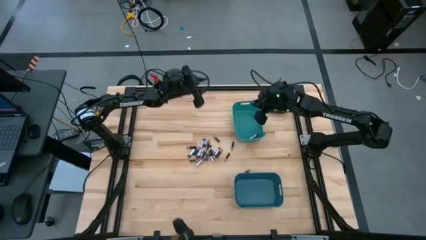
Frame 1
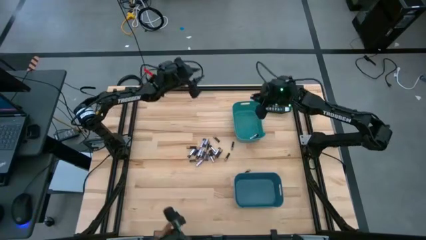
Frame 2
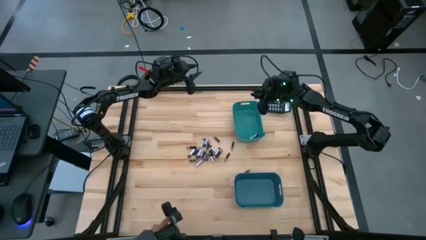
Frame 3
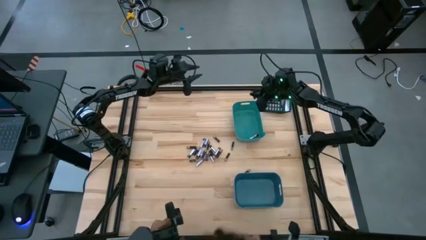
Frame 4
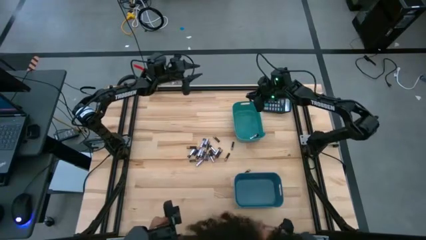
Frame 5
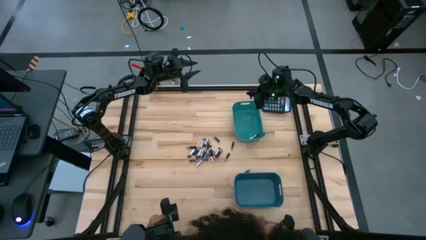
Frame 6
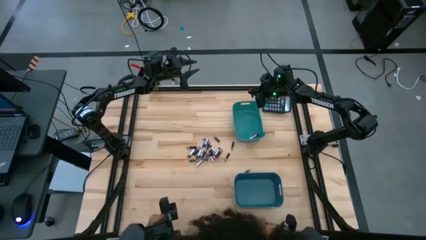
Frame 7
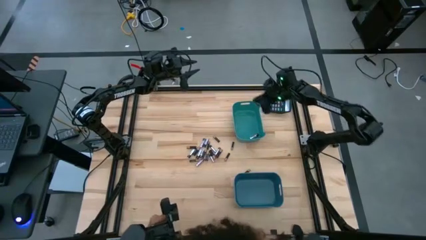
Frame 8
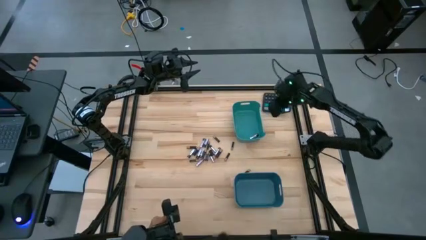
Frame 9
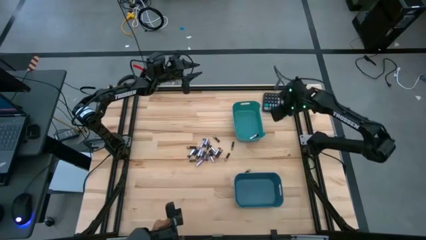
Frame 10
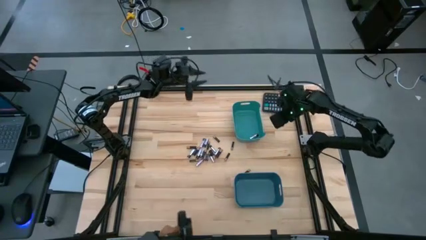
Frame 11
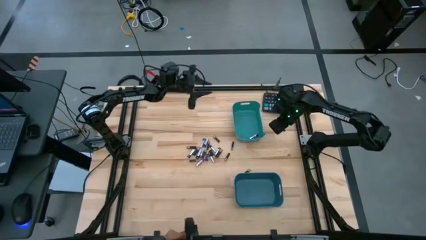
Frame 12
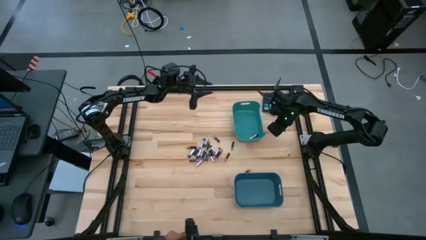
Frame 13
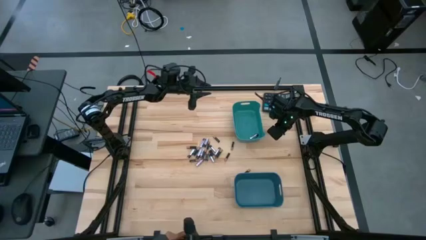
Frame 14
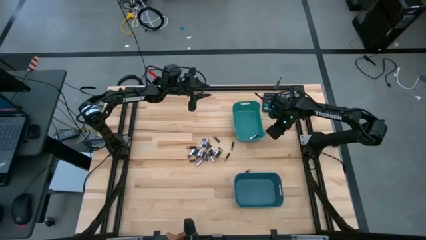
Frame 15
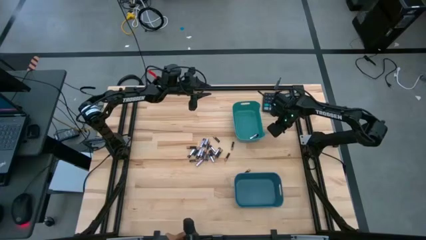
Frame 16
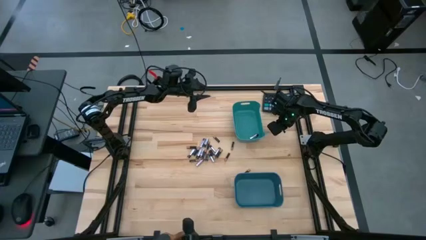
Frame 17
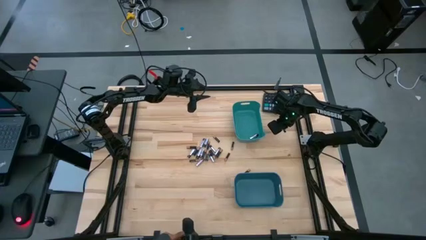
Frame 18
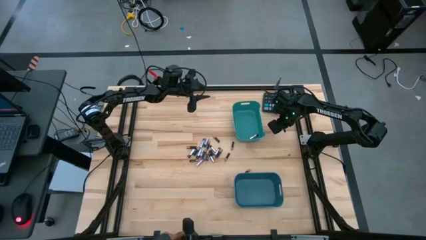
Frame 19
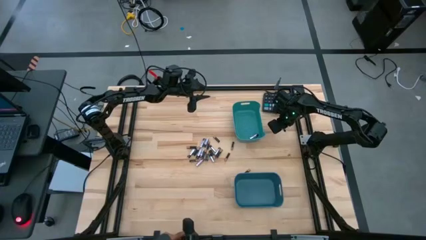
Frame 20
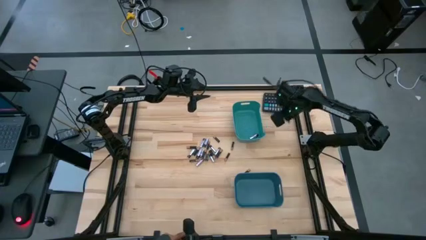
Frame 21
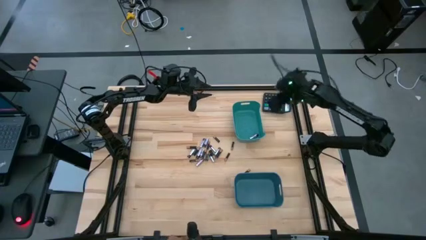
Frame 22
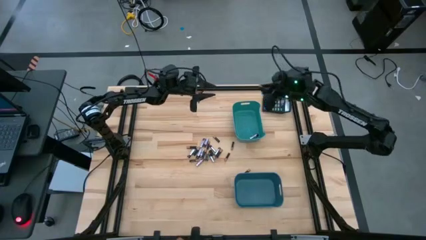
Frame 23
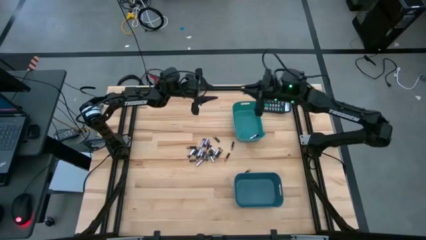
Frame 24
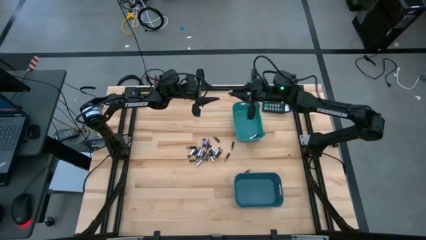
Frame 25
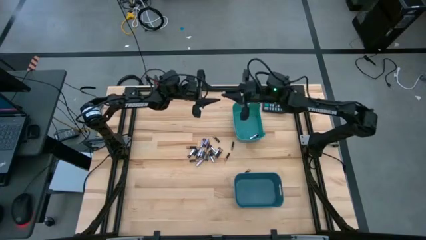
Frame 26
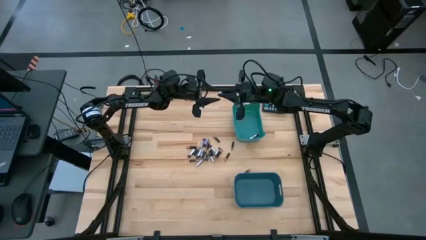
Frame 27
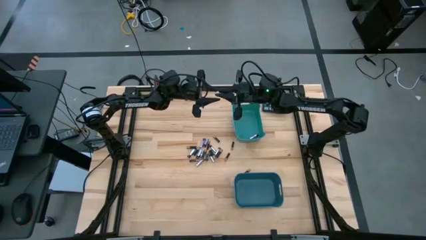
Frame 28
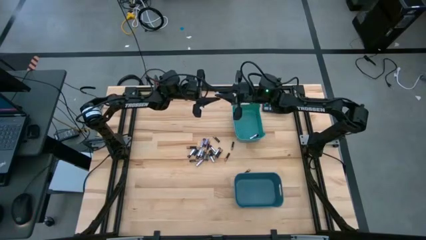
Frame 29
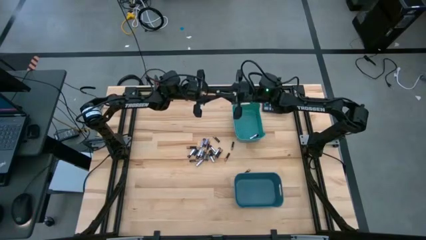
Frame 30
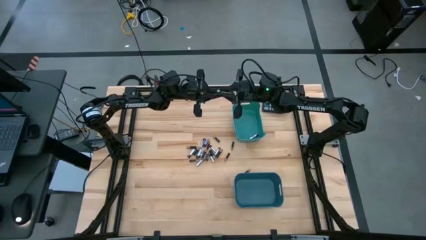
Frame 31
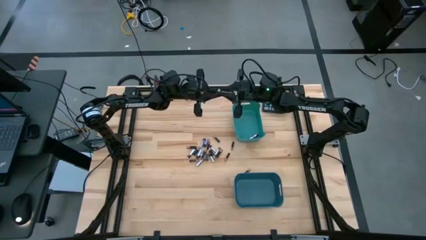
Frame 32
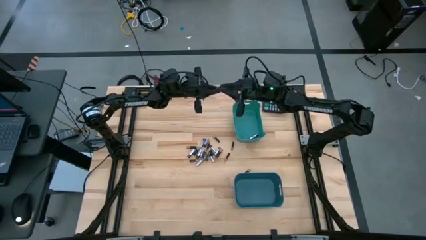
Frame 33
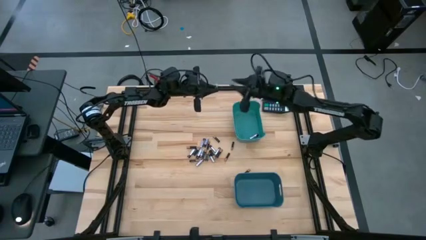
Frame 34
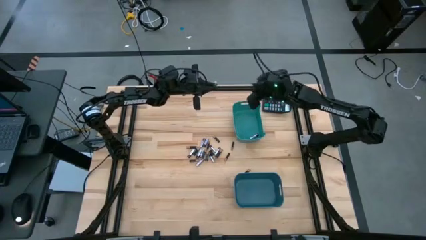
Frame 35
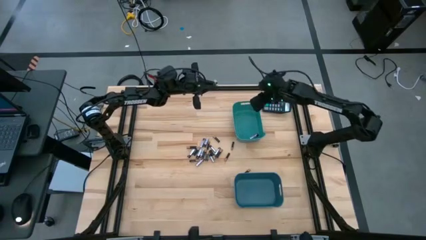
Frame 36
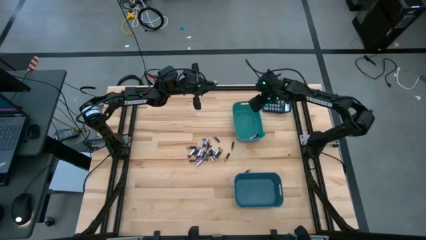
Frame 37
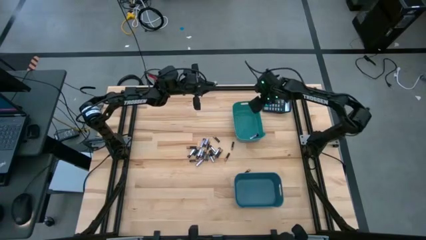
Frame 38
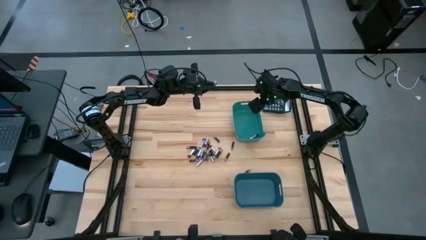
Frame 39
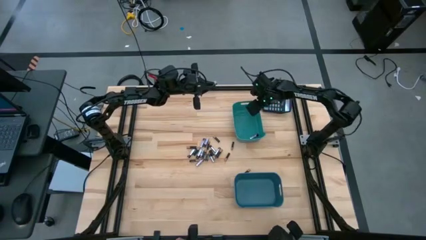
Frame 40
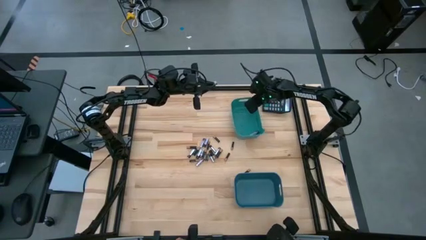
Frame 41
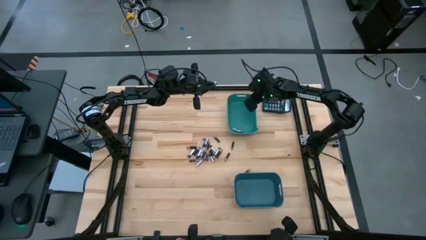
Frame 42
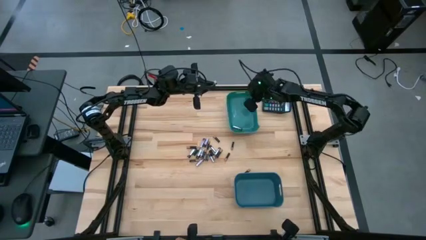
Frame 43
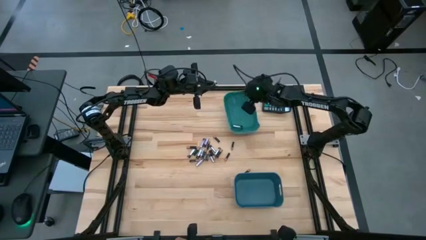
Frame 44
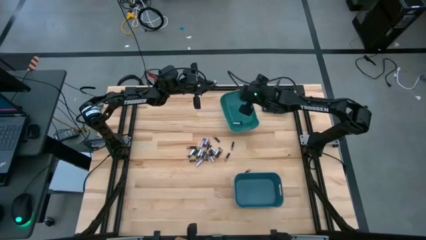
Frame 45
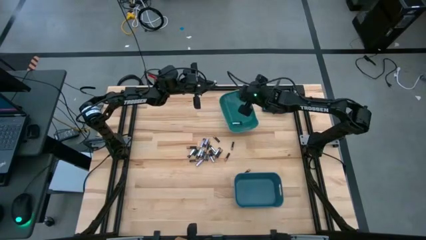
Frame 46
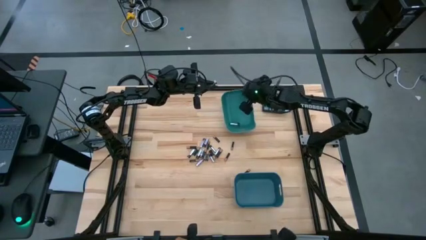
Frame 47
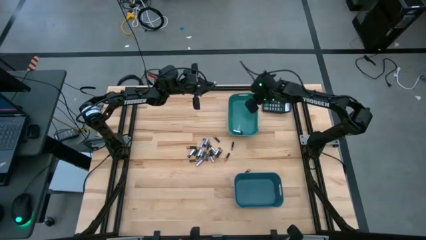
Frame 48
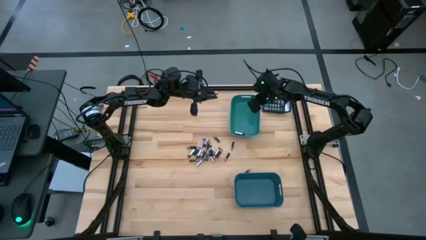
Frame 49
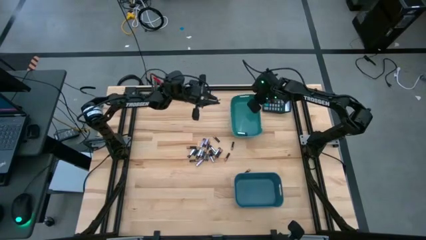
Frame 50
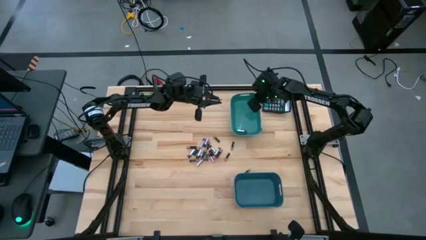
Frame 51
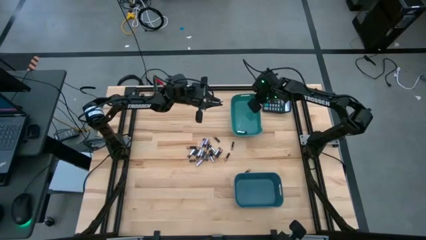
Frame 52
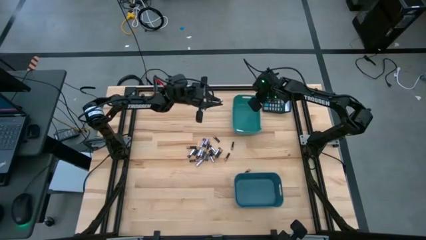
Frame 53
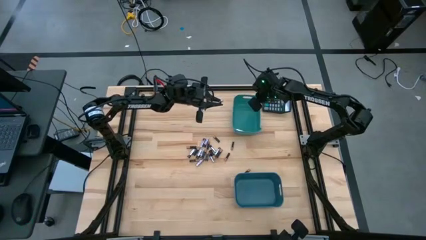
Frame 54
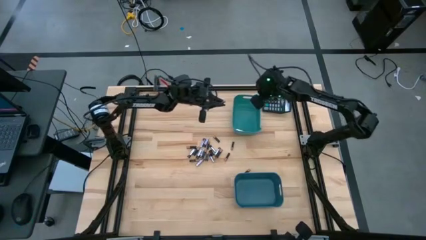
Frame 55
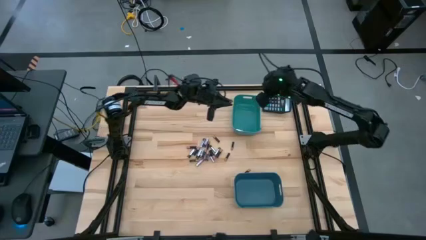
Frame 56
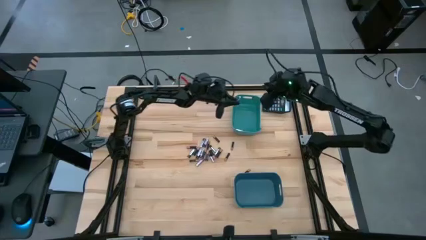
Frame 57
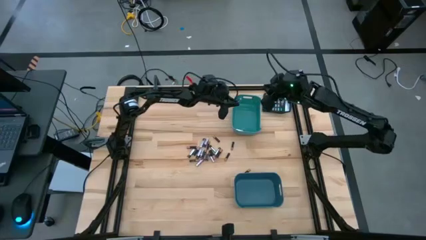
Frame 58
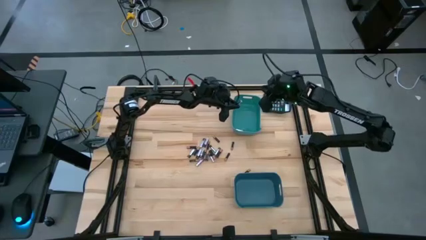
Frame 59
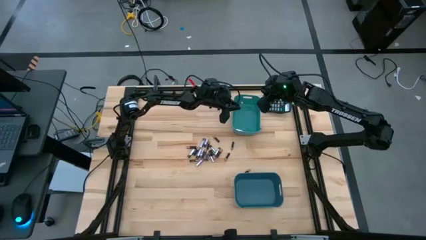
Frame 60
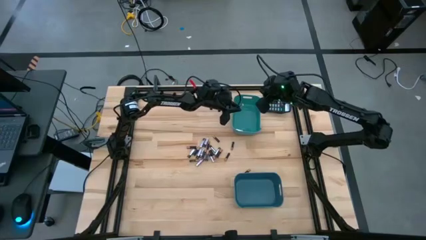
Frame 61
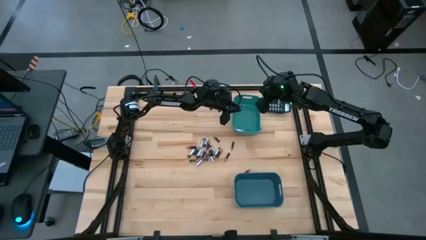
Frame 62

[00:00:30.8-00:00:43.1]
Task: Sort batteries
Put the silver battery into the green bin

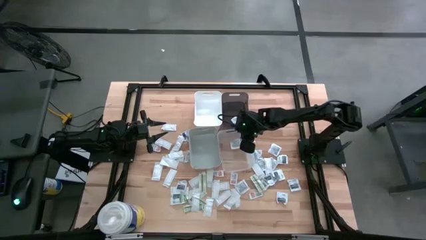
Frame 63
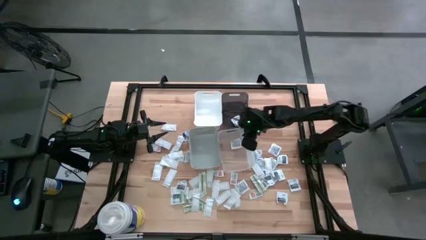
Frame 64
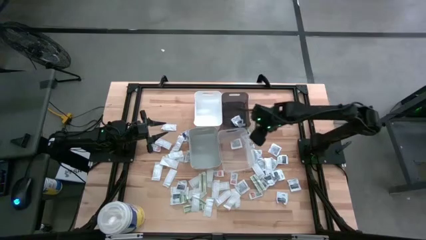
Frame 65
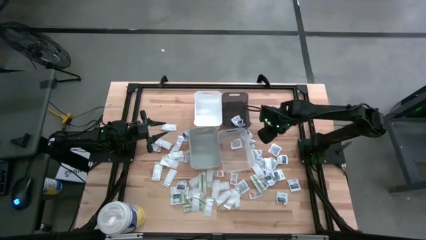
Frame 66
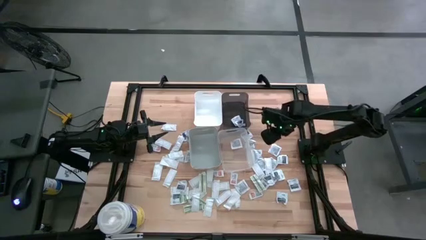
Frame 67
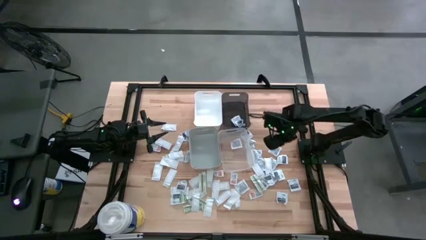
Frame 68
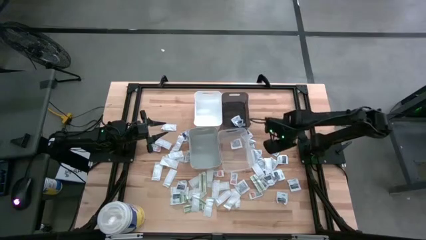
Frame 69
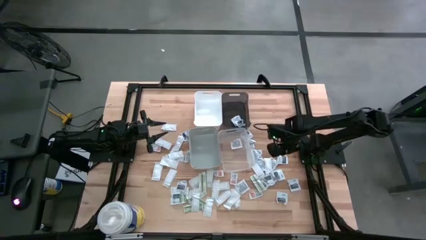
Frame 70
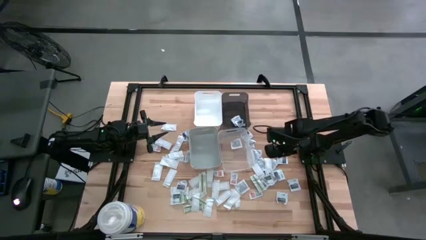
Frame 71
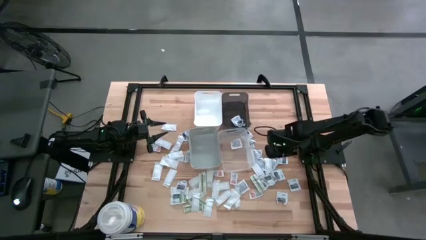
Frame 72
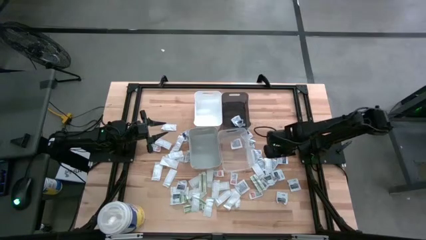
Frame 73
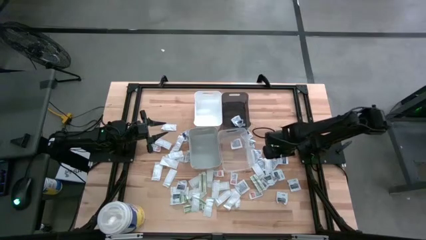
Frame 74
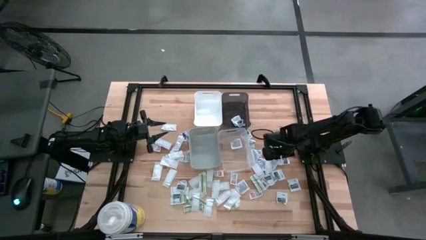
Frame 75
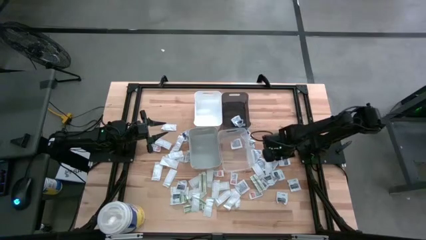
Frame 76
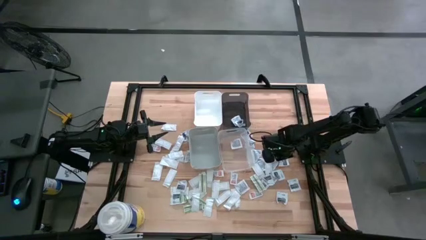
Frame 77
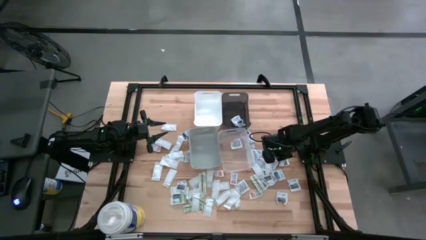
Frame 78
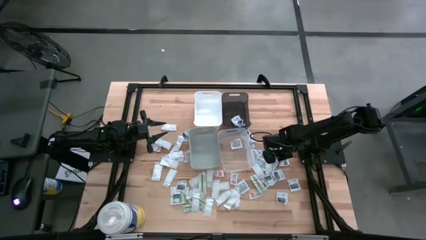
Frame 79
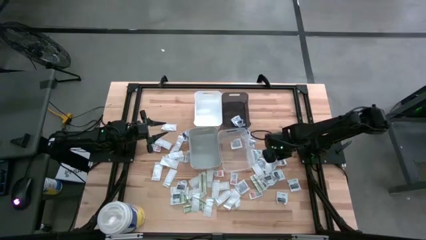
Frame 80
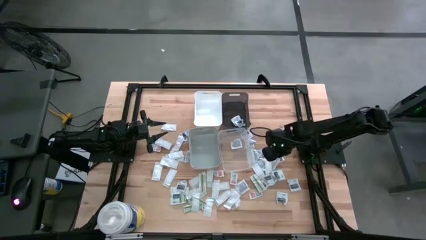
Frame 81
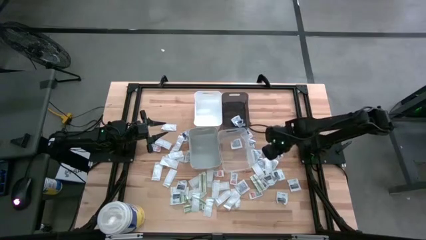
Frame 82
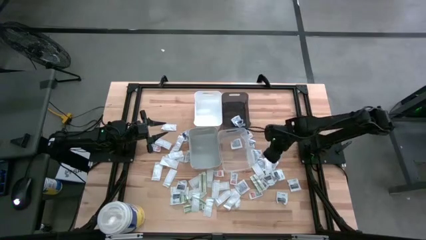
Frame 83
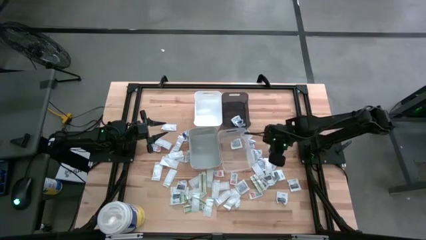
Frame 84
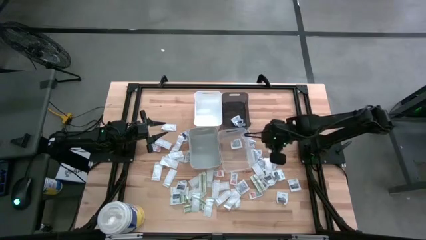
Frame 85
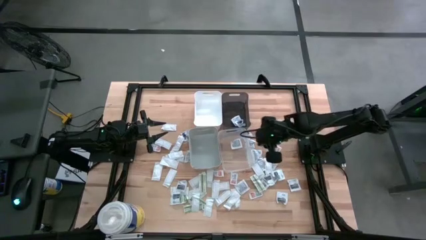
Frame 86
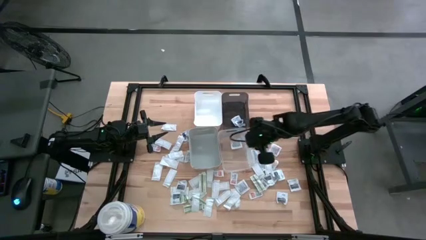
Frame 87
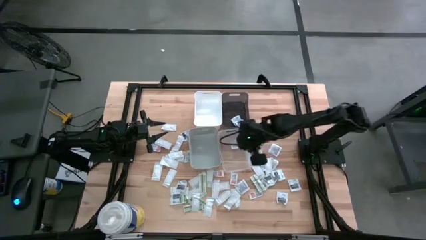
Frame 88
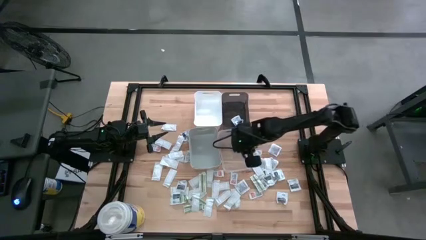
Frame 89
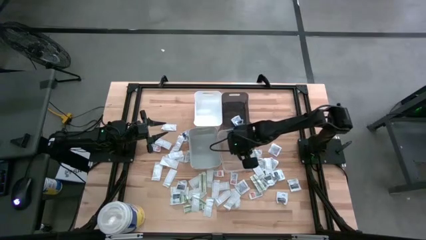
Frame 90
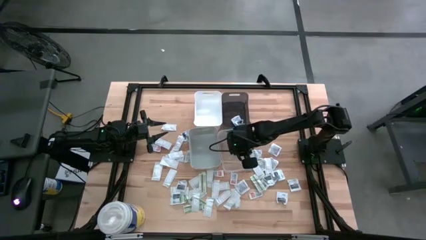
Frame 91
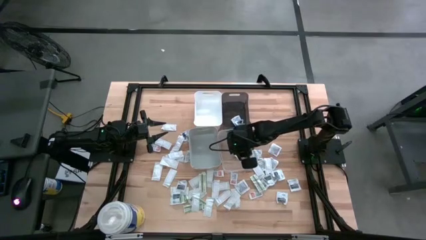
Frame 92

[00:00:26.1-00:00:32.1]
Task: Pick & Place First Aid Supplies
Put the gray towelette pack into the transparent bin
